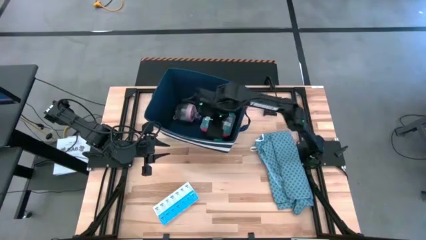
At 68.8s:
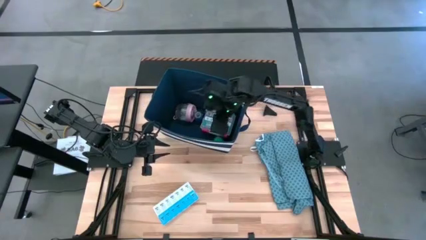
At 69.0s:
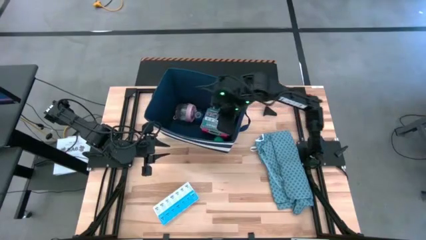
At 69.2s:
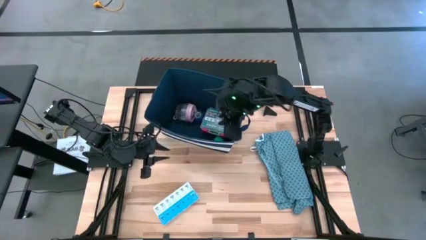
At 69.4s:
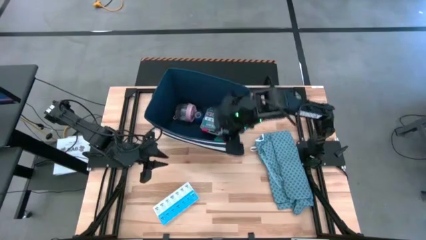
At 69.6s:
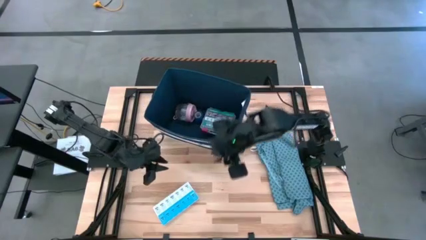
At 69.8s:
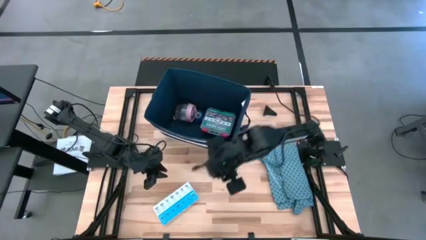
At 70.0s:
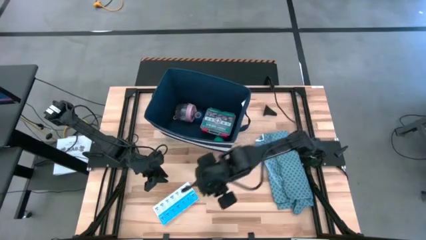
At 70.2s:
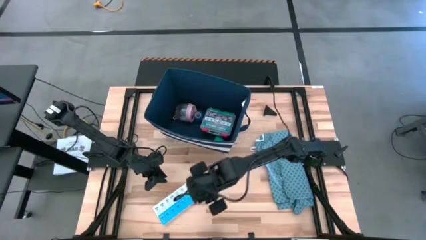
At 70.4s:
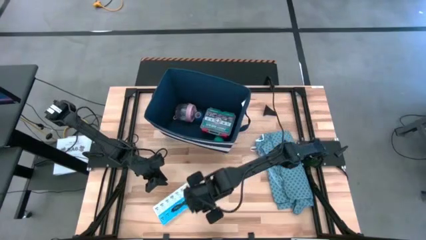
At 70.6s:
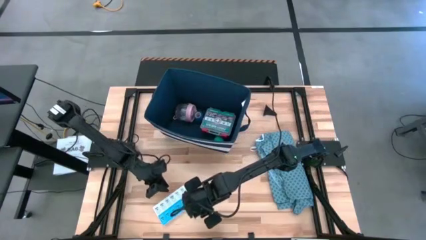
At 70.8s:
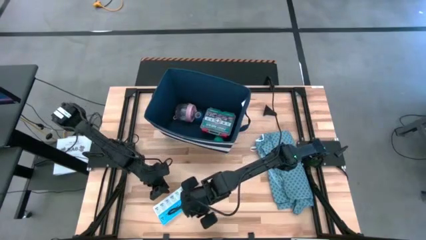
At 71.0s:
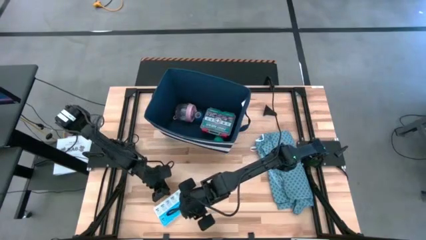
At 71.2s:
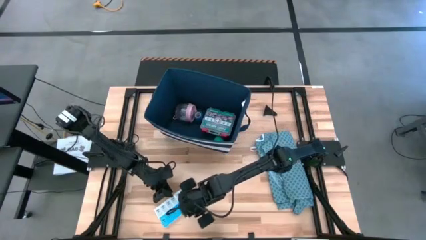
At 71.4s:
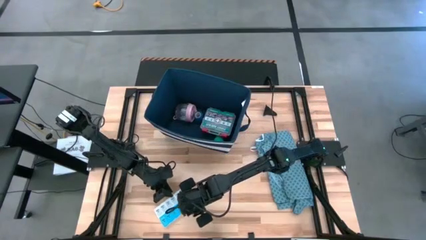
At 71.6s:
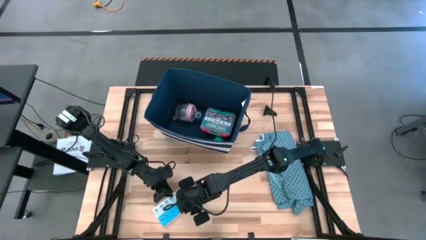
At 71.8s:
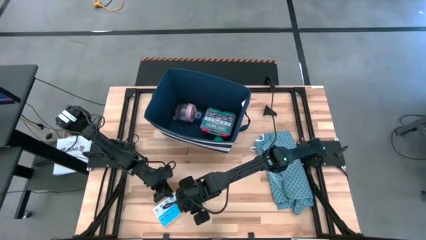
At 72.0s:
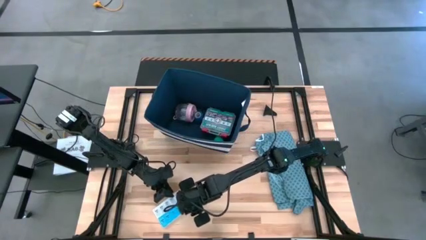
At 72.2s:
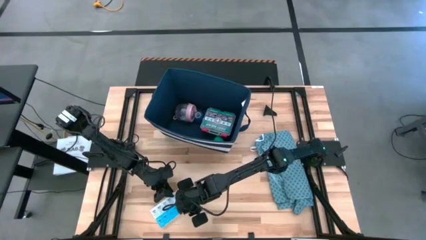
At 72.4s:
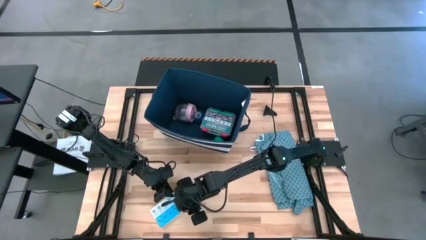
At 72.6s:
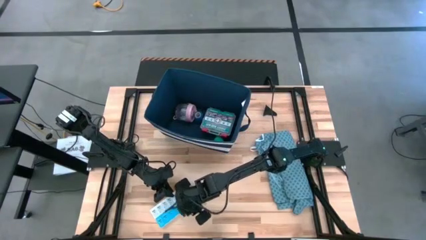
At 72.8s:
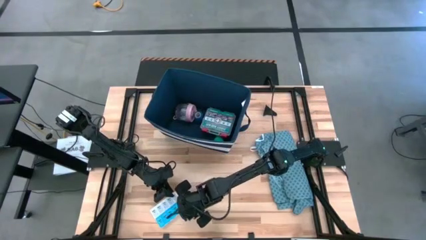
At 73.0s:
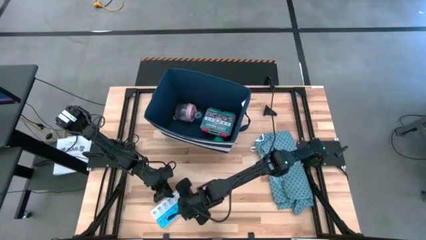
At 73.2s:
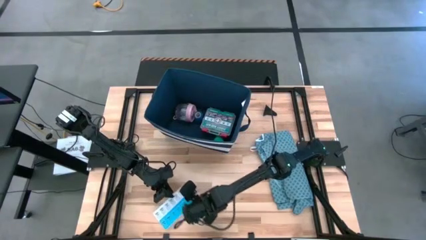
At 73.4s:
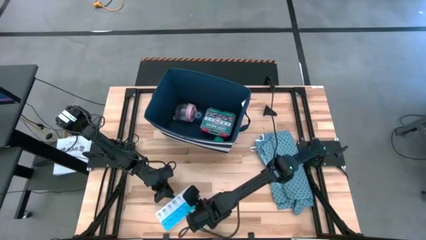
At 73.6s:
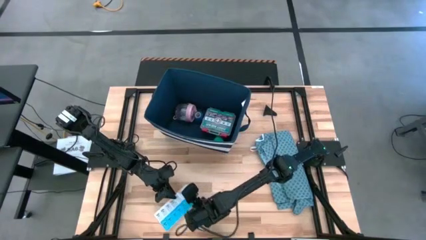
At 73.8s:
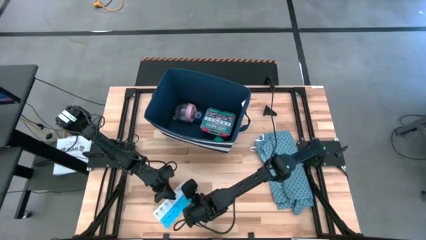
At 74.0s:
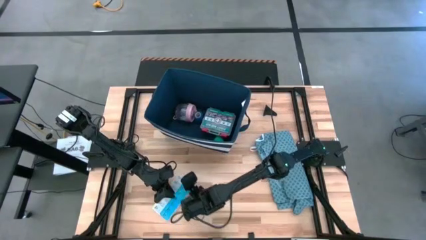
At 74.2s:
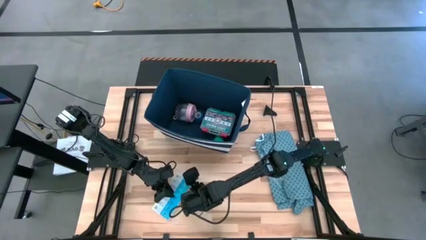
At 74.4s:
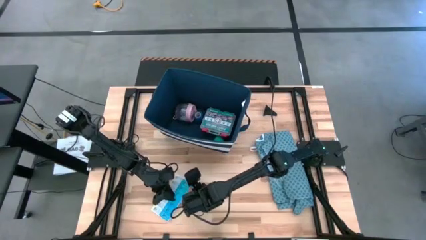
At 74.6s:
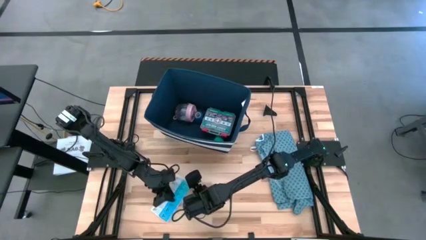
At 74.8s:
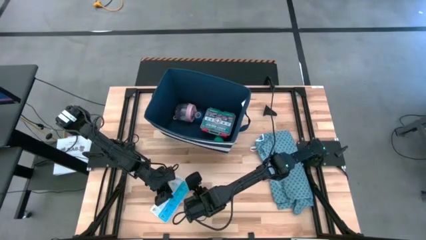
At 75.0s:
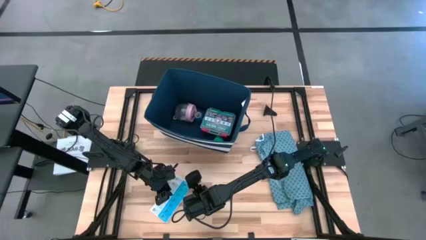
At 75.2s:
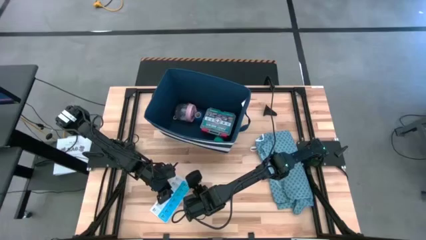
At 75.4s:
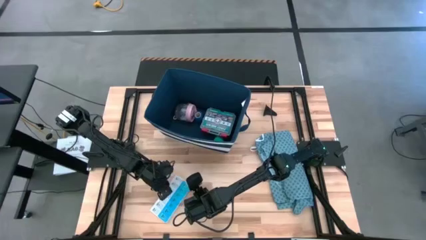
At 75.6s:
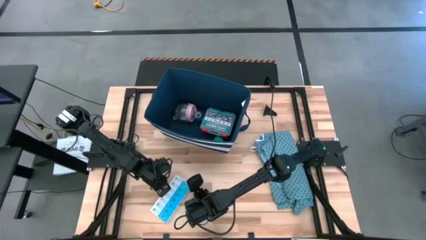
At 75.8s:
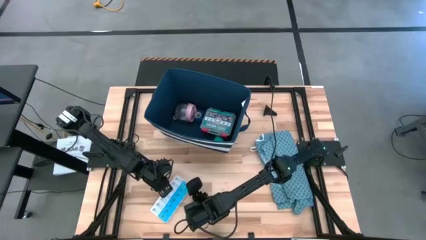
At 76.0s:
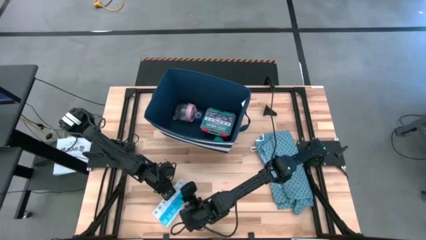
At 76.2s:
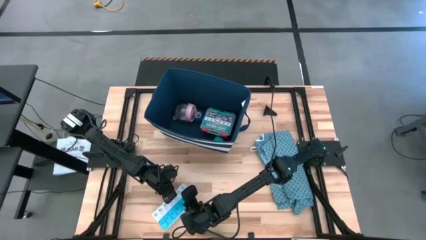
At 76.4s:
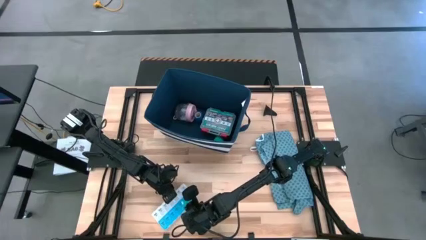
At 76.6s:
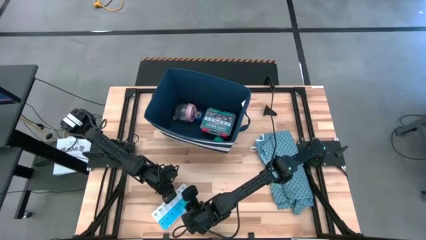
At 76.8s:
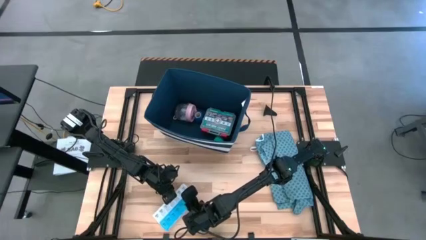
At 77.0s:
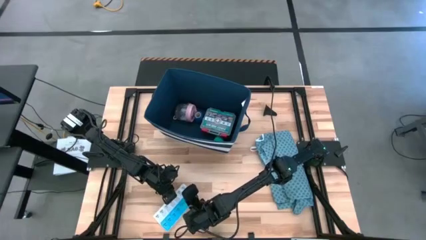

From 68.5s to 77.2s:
Task: Pick & place medical supplies in basket/bin
Put the pill organizer into the laundry organizer

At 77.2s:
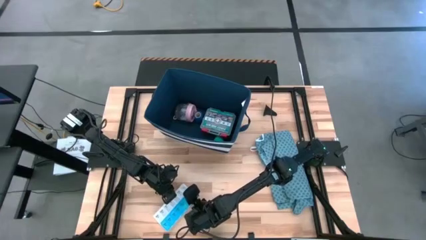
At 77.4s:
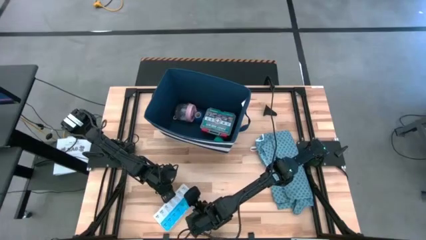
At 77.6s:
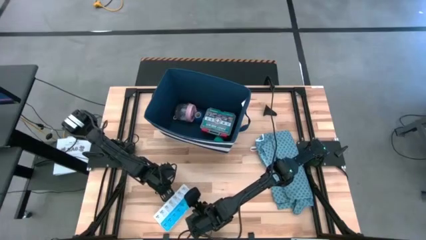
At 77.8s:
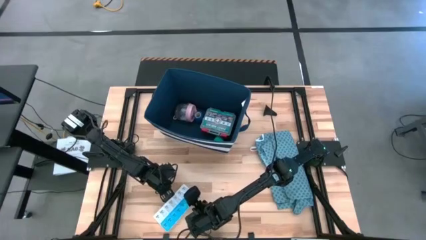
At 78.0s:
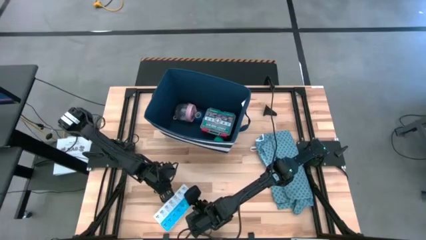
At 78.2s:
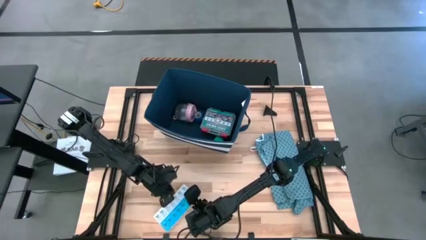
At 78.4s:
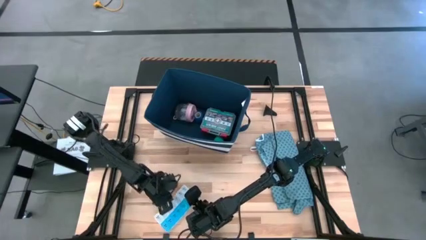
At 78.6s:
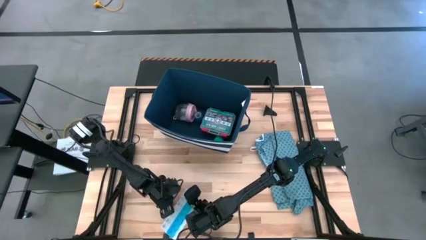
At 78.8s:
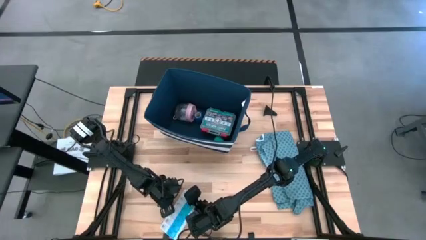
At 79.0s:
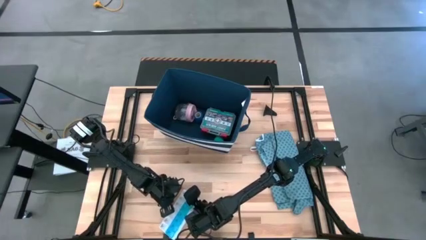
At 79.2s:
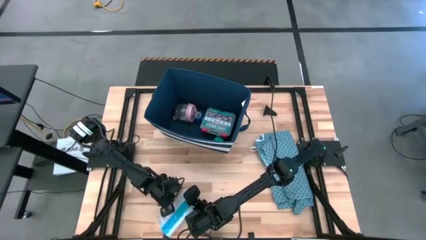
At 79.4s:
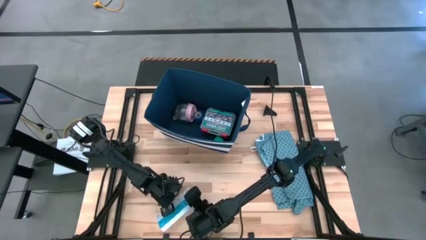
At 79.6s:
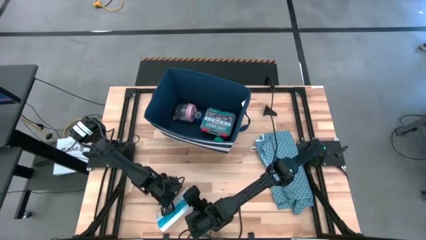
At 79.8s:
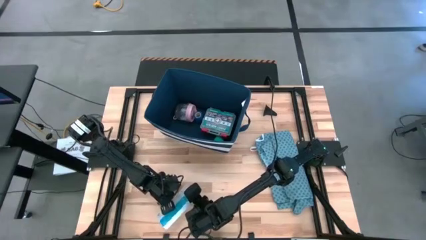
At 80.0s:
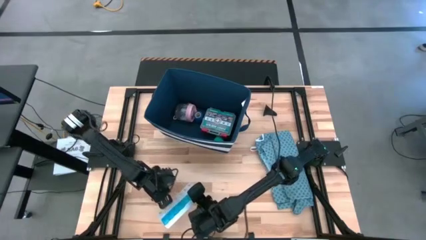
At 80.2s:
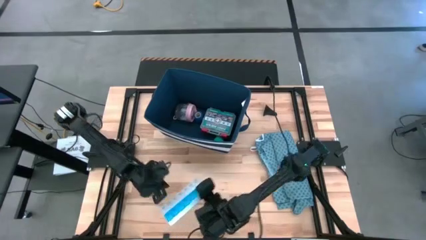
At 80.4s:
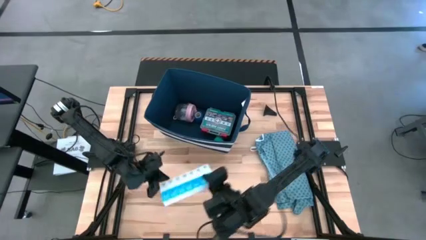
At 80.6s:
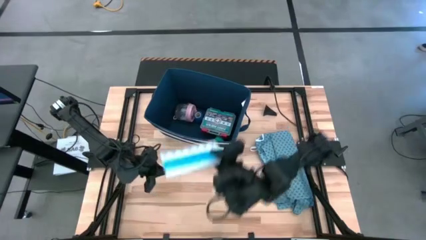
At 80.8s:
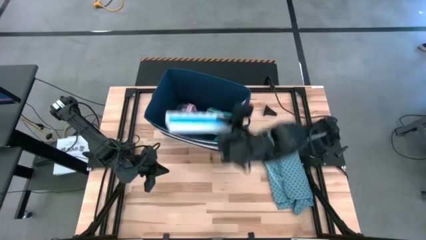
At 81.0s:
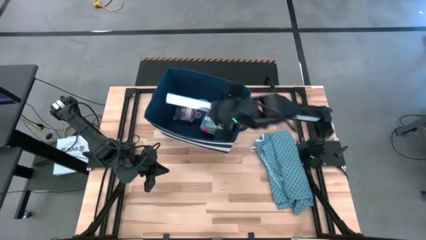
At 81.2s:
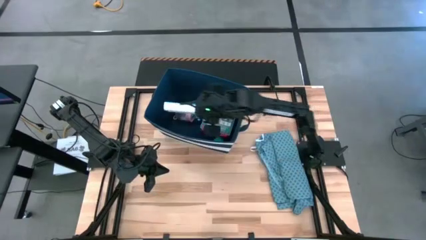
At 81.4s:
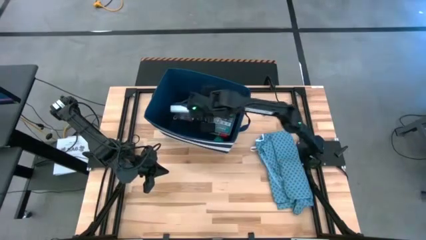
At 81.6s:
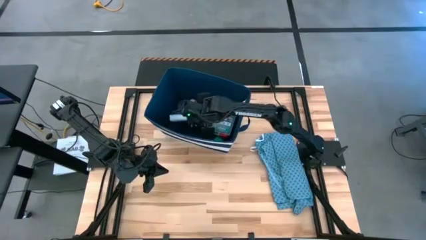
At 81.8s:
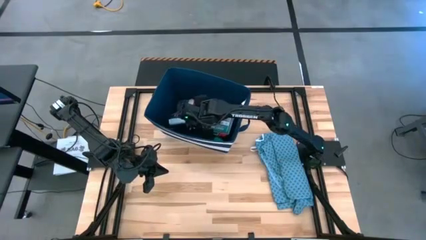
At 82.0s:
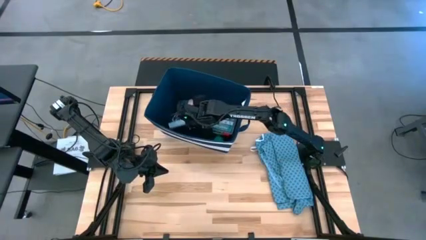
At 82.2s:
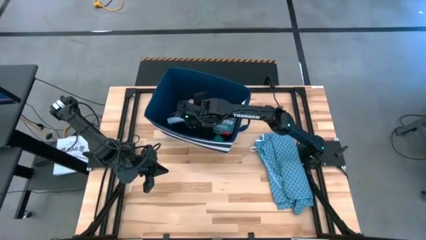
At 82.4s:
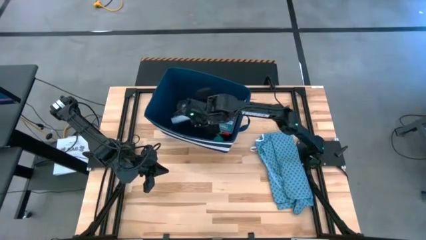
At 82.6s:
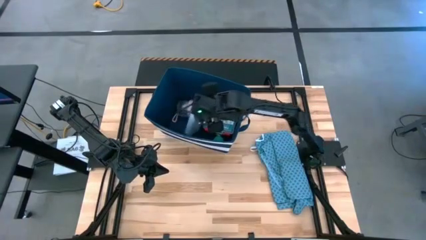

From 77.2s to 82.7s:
Put the pill organizer into the laundry organizer

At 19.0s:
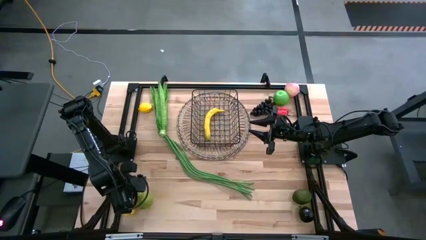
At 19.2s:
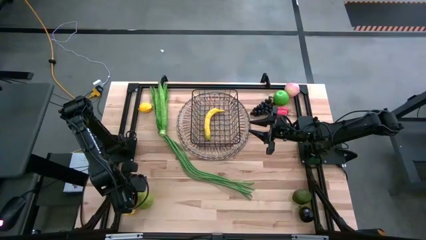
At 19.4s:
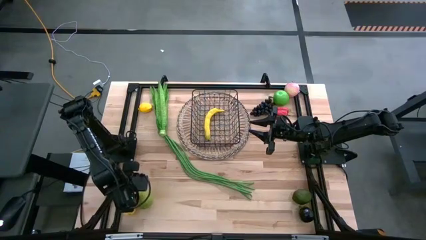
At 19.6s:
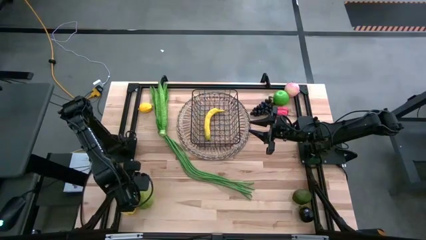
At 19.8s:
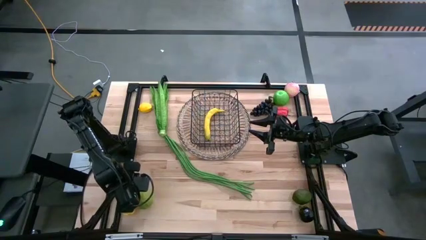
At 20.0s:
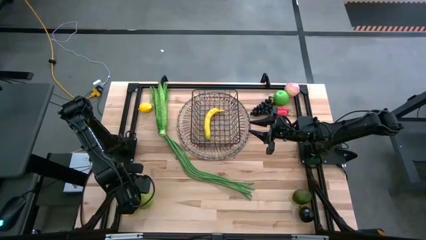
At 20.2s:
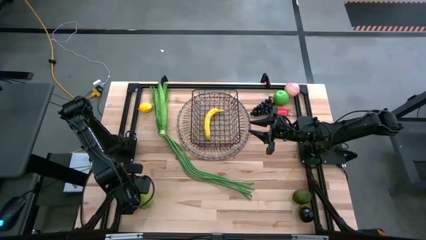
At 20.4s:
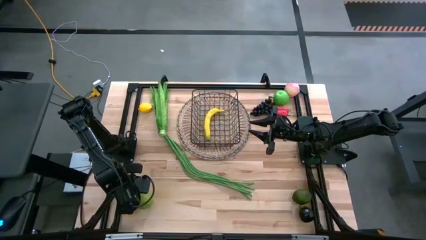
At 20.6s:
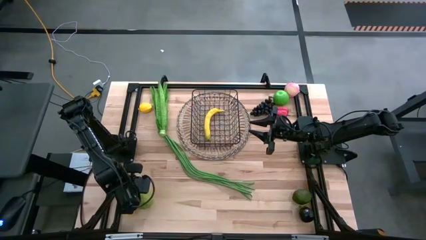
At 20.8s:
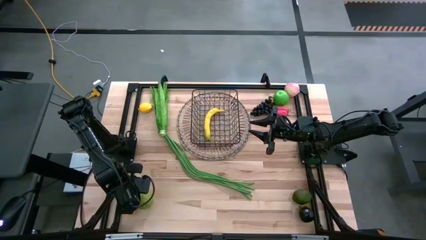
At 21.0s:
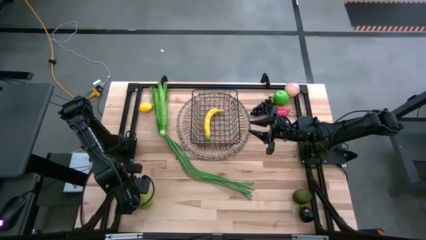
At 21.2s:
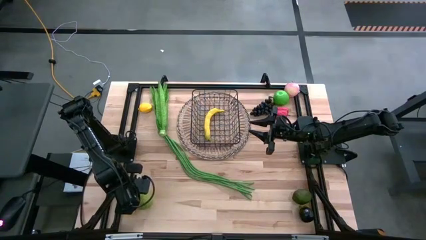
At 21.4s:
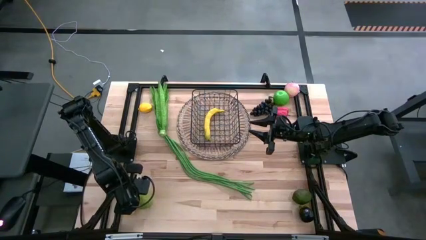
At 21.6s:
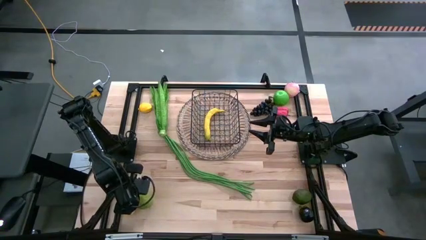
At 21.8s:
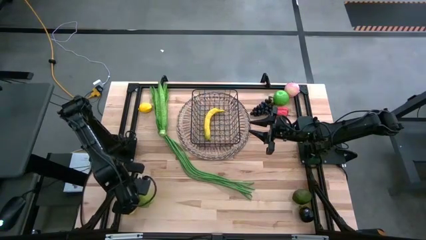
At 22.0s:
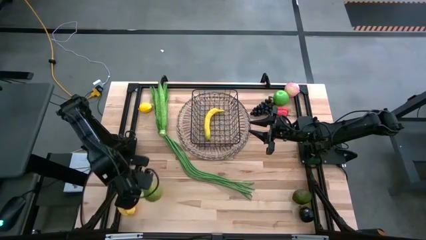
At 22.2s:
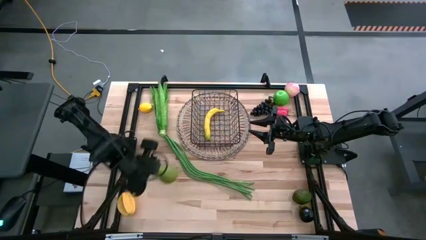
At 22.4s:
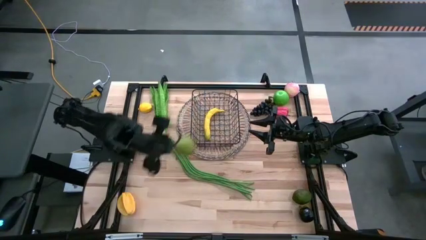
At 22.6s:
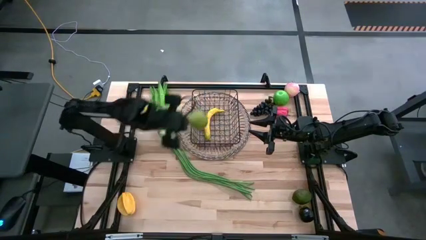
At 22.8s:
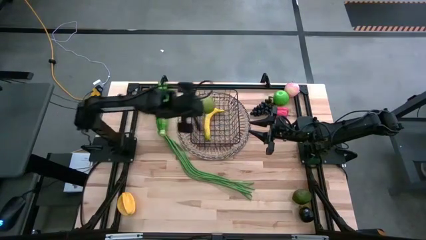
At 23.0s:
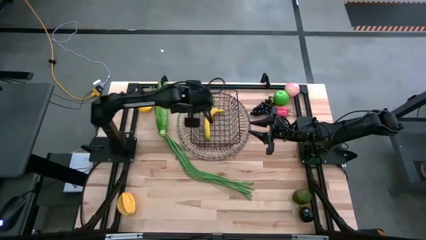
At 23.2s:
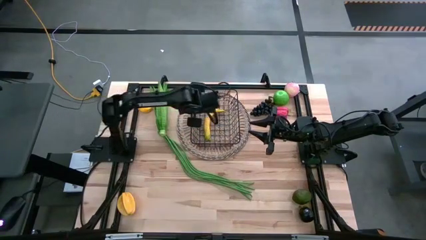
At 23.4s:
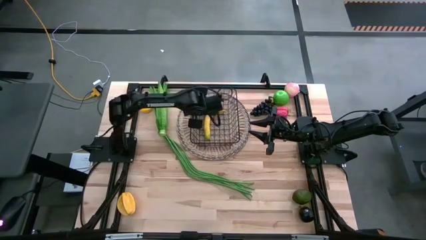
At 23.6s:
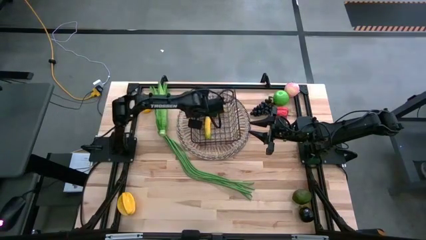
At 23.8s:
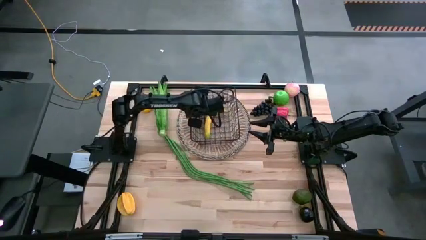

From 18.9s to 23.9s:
Task: Build produce basket
Put the green pear into the black mesh basket
